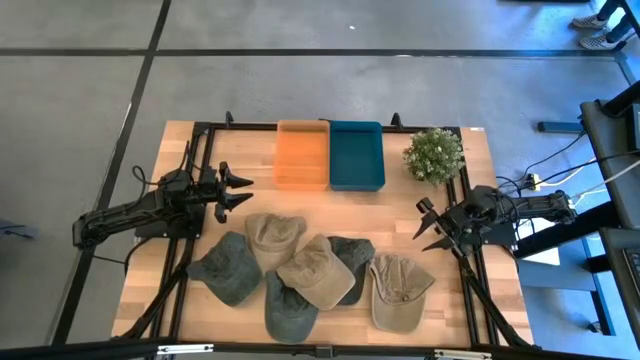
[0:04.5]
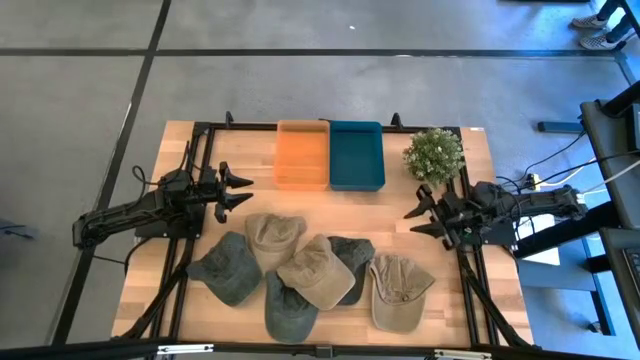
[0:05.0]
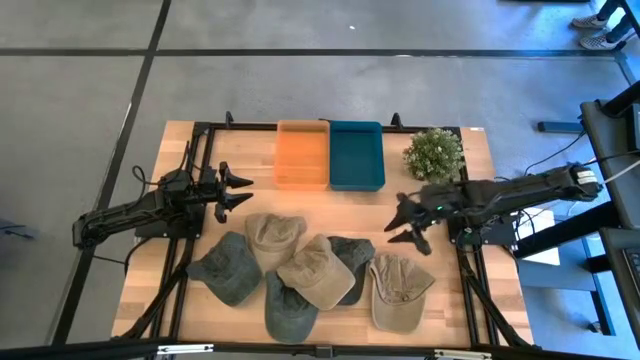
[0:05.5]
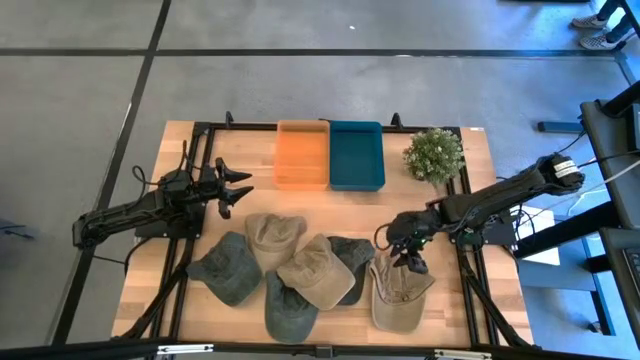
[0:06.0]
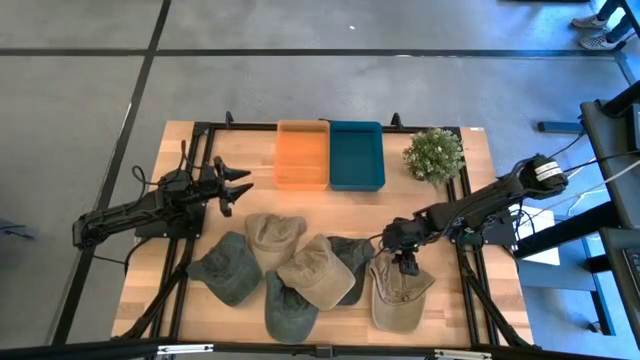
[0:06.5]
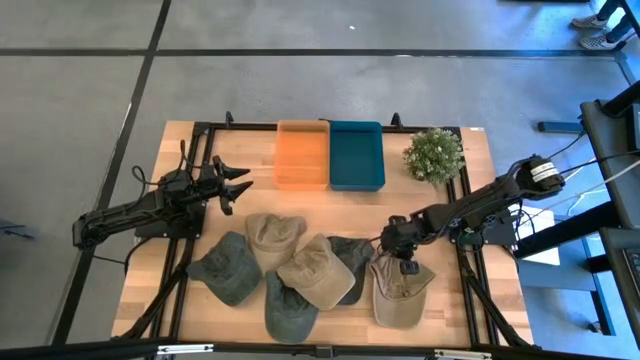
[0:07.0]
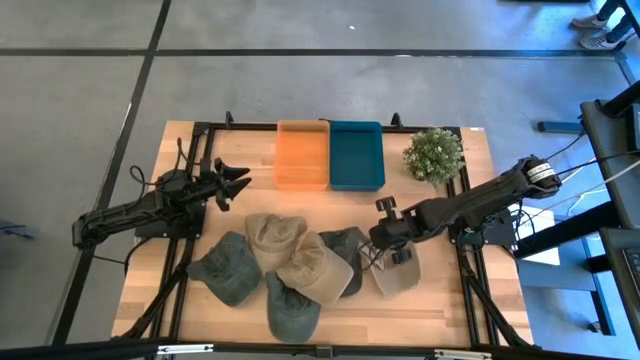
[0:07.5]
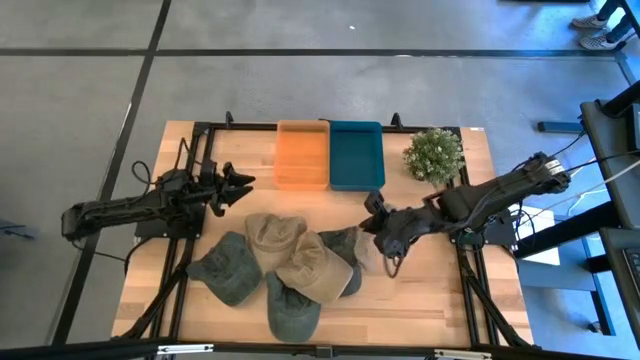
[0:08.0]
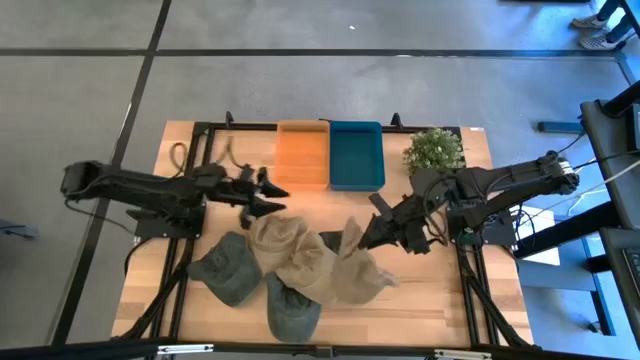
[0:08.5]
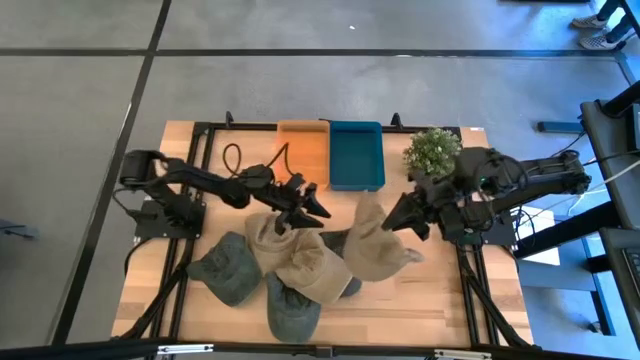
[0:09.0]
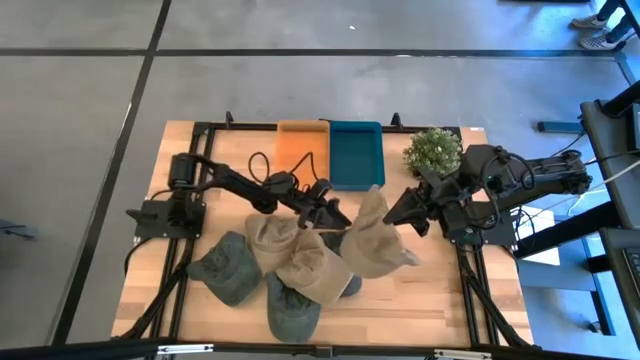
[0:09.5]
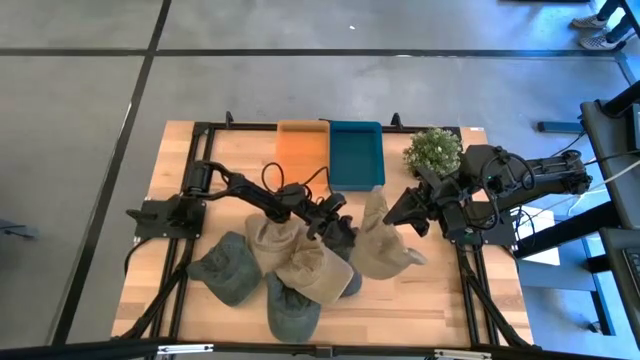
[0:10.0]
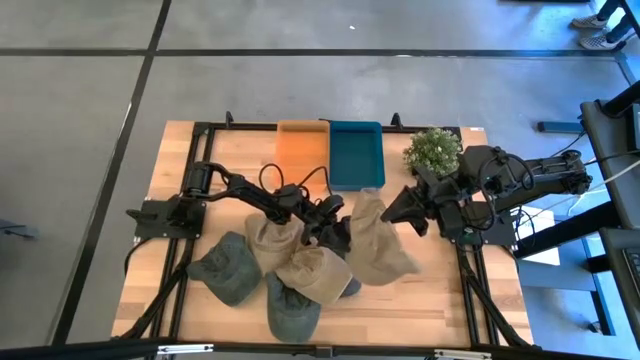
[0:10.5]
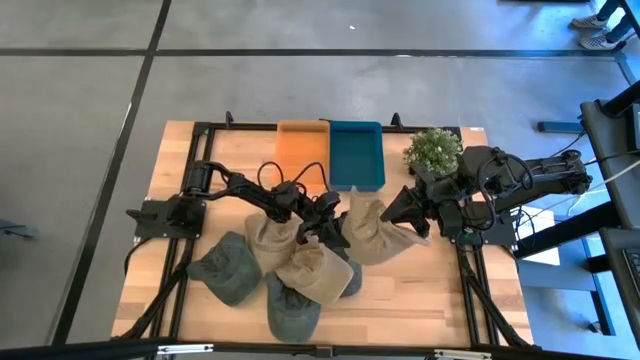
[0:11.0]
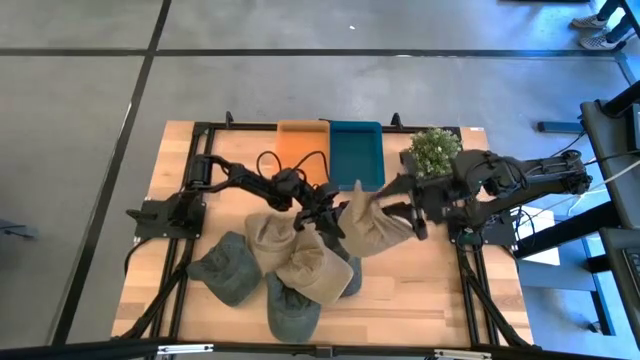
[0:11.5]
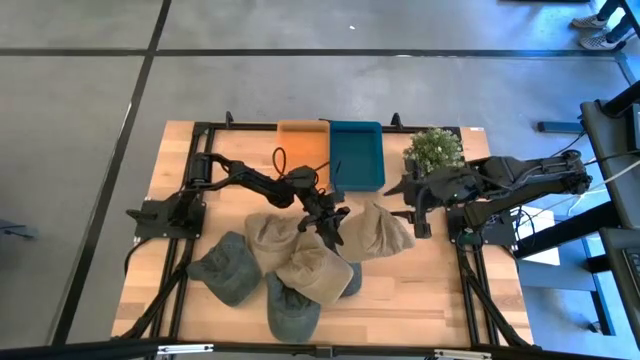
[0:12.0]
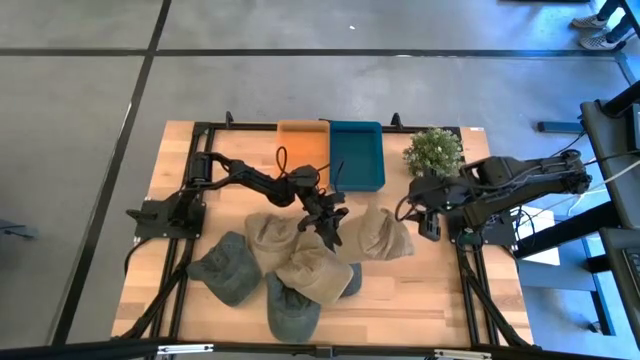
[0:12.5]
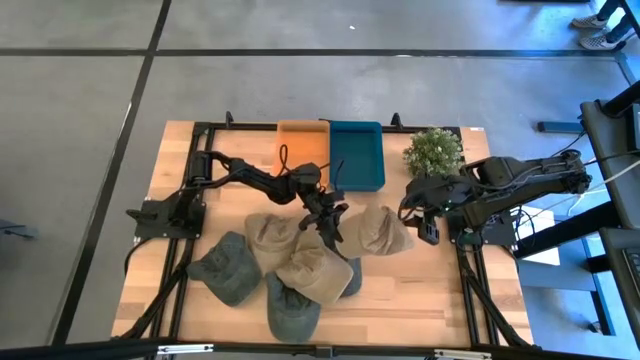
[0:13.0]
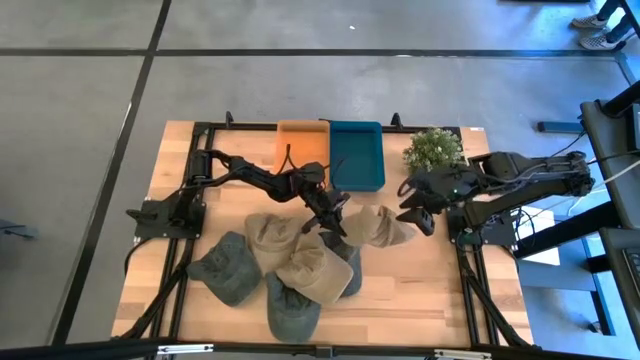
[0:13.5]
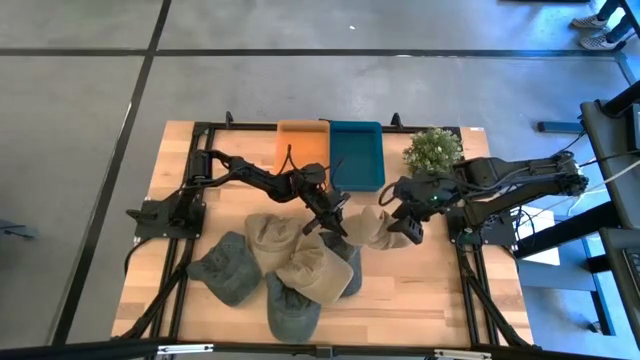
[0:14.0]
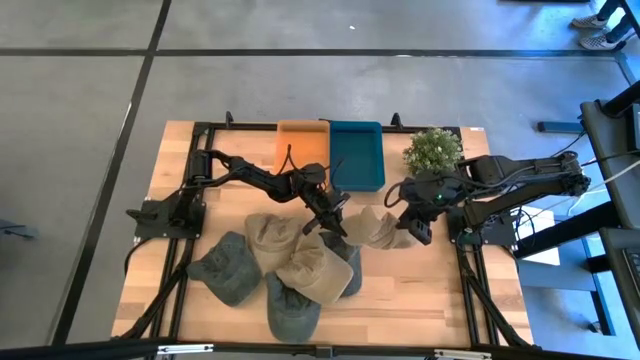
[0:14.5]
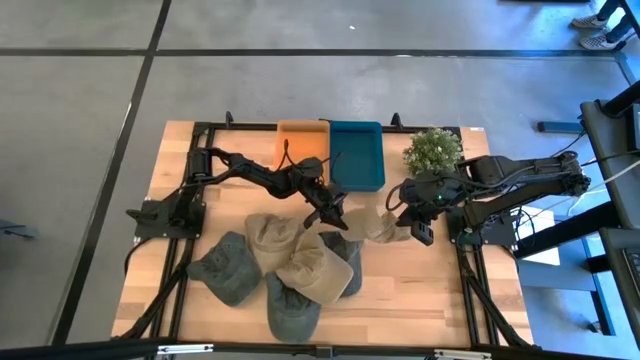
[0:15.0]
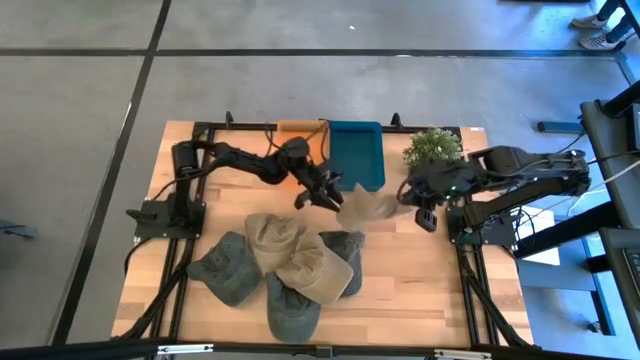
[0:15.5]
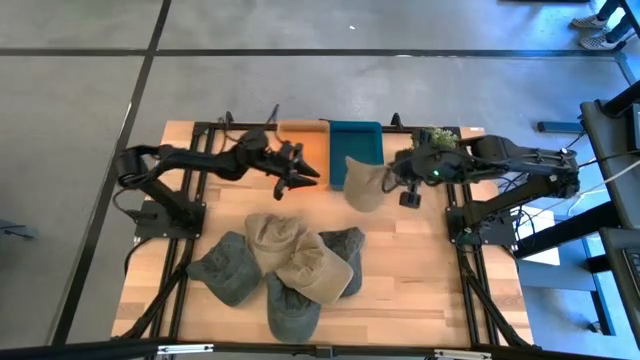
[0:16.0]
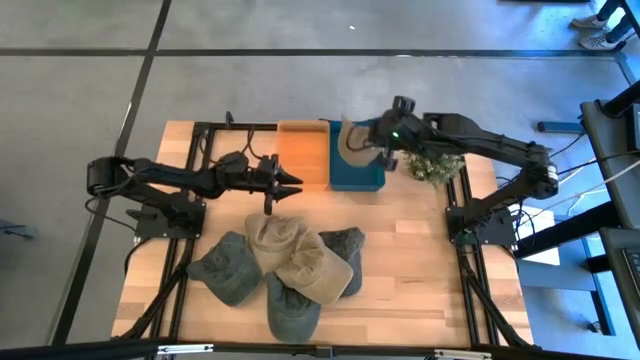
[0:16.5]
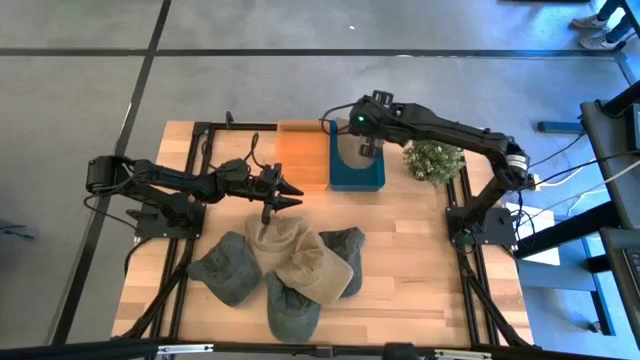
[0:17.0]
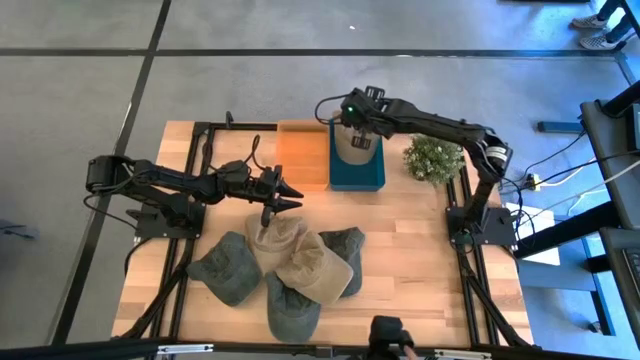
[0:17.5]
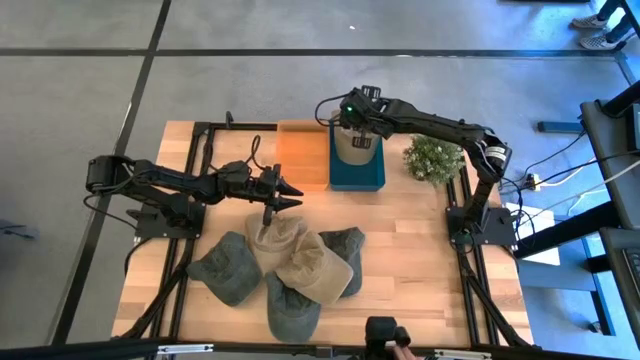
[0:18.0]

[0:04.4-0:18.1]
Task: Pick & Place hat
Put the right brown cap into the right transparent bin

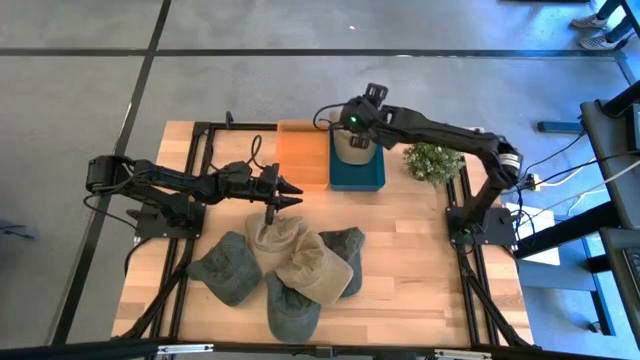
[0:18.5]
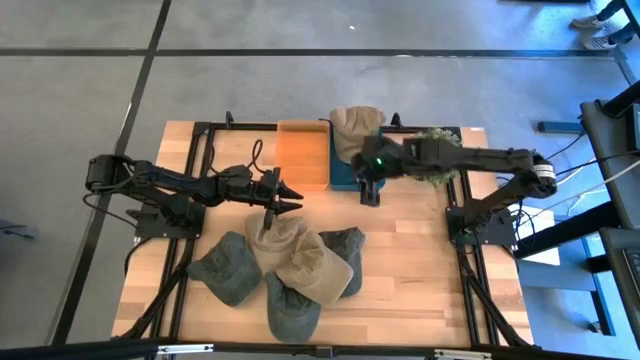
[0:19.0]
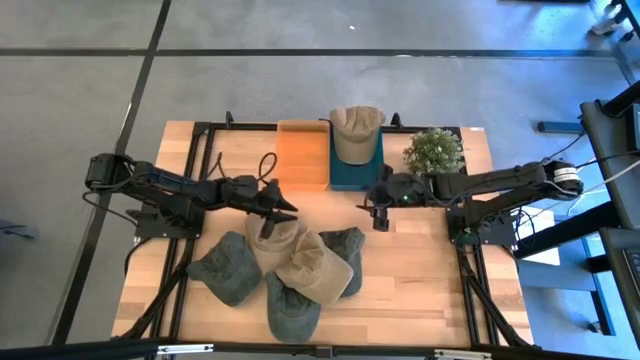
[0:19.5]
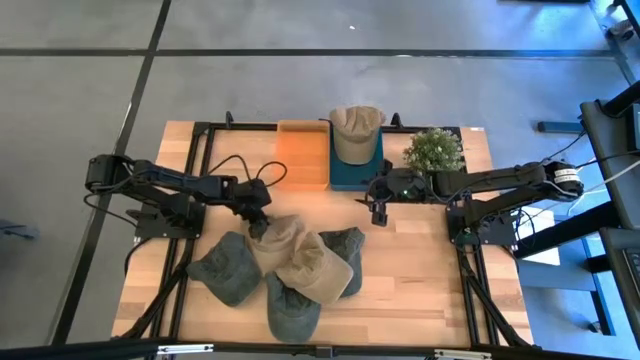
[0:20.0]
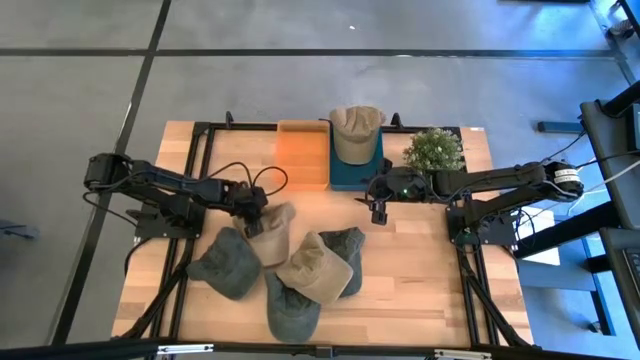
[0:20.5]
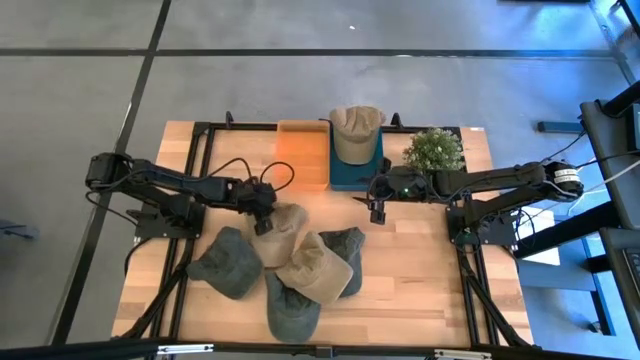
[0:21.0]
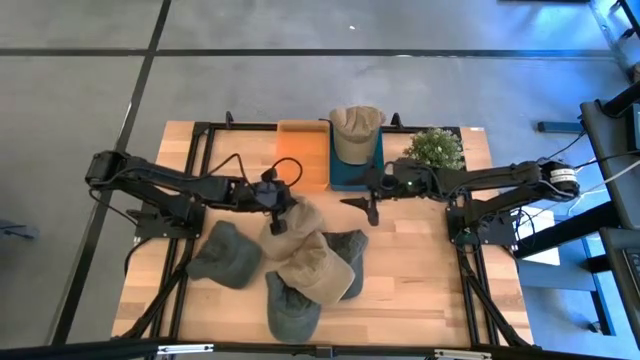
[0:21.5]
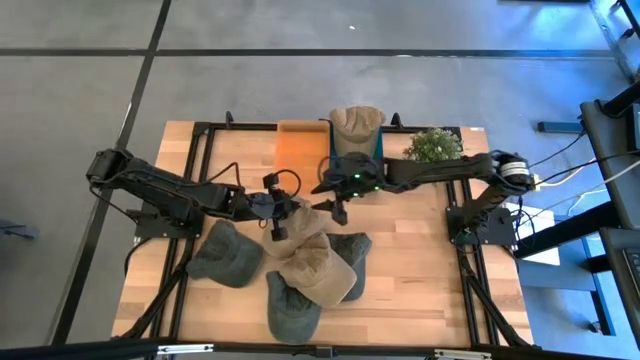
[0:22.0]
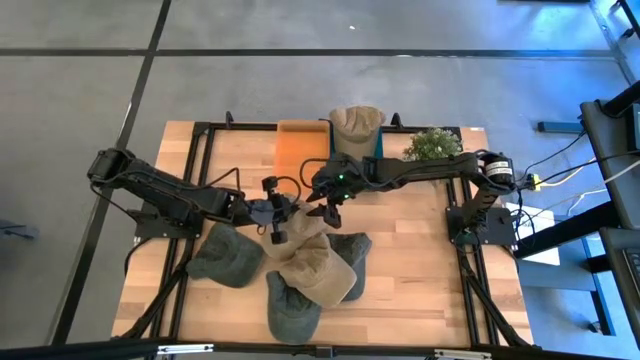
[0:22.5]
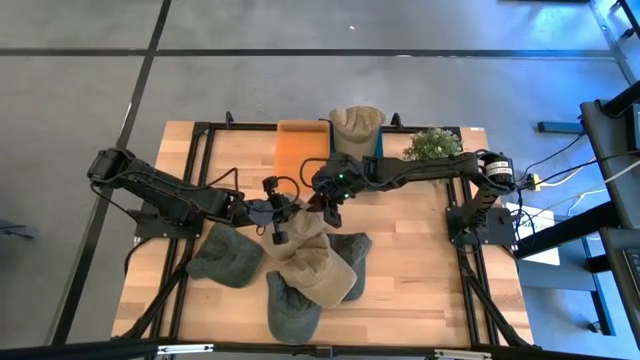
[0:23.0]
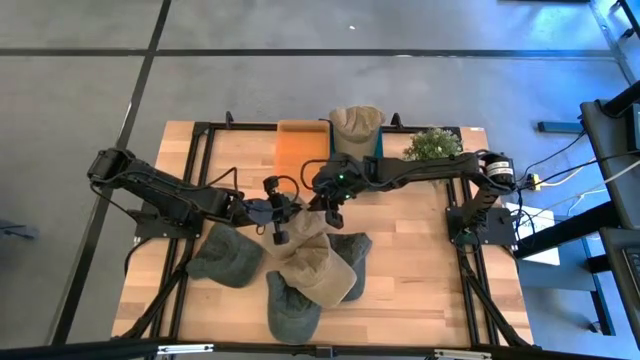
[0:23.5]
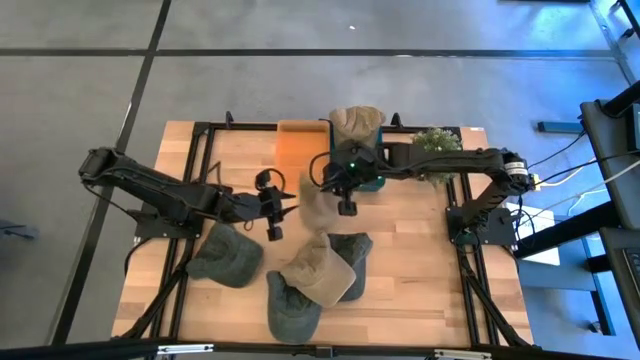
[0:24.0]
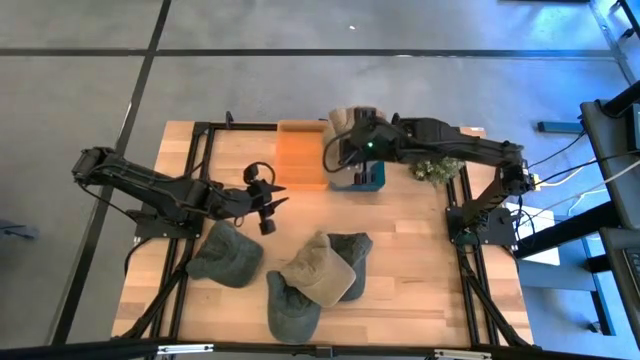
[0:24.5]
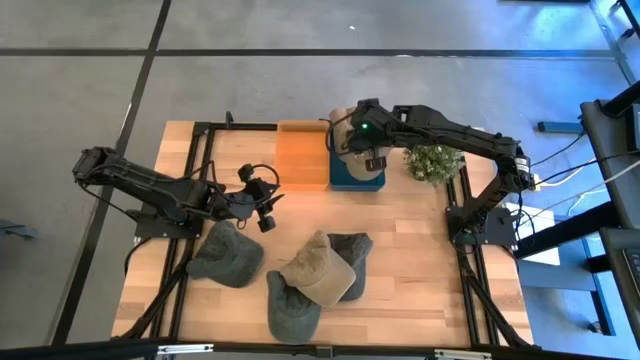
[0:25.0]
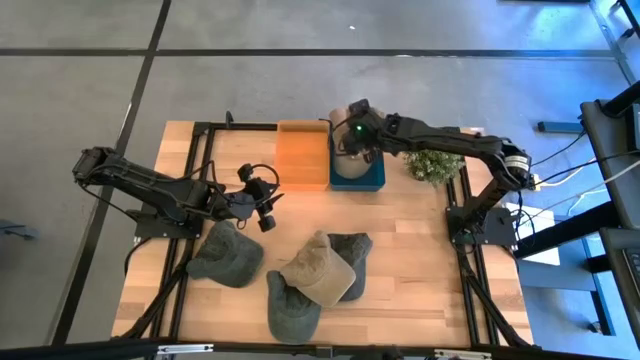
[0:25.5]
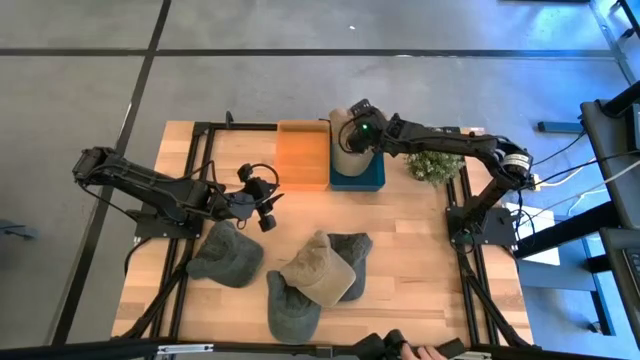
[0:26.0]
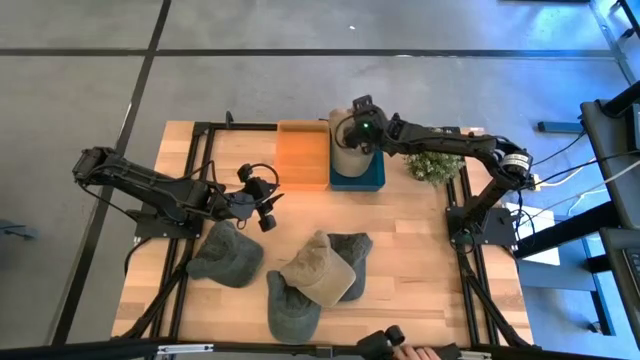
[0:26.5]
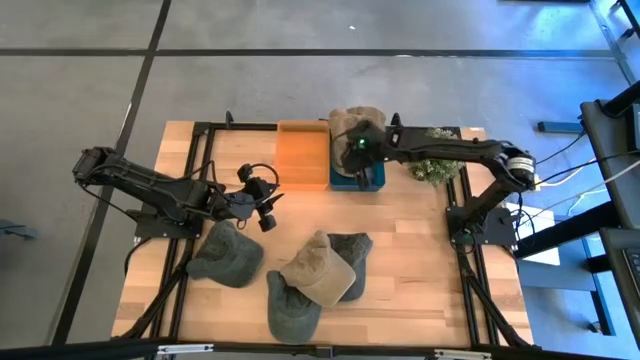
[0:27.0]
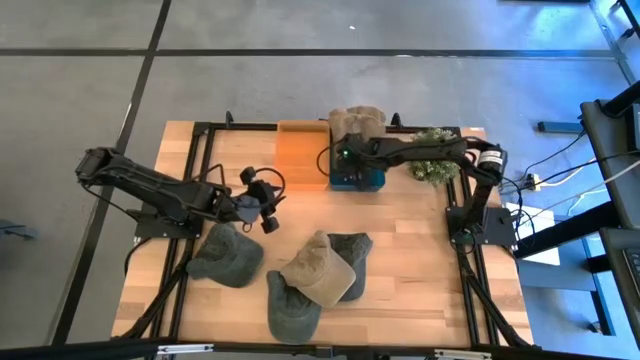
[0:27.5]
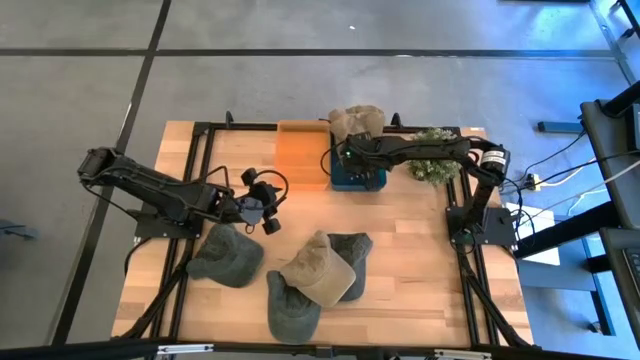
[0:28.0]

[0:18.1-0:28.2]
Put the left brown cap into the right transparent bin
